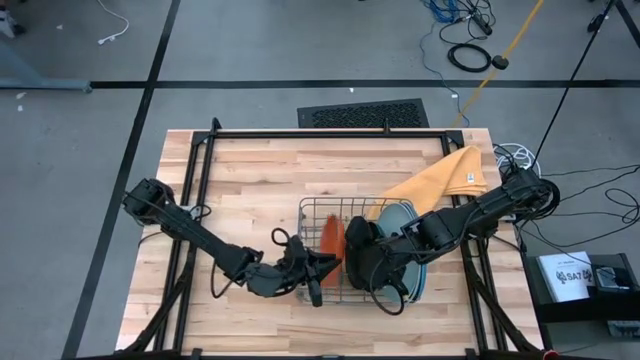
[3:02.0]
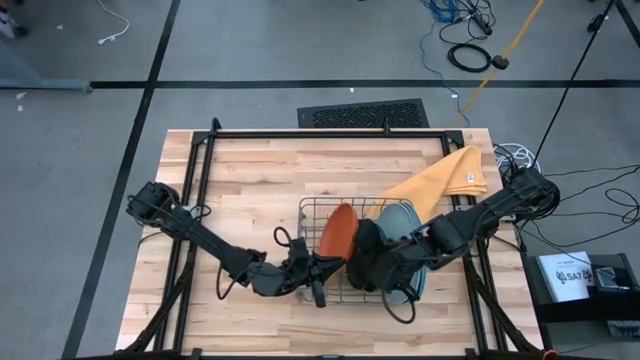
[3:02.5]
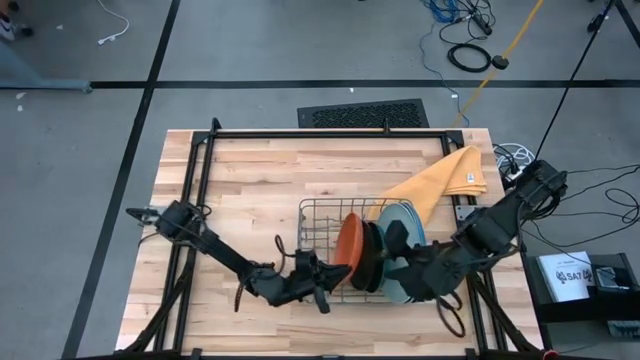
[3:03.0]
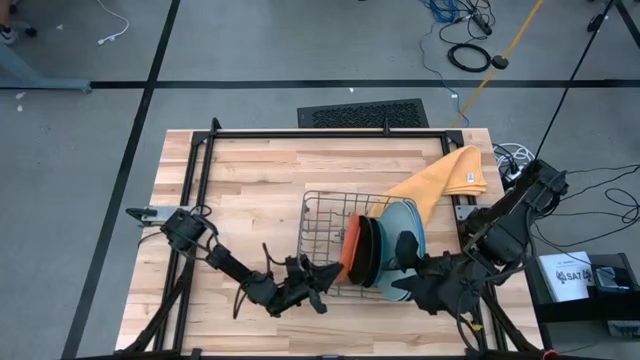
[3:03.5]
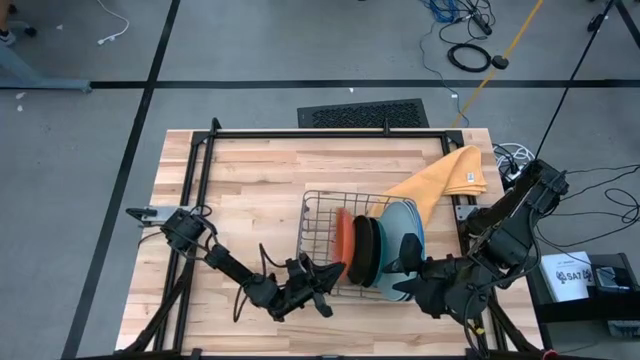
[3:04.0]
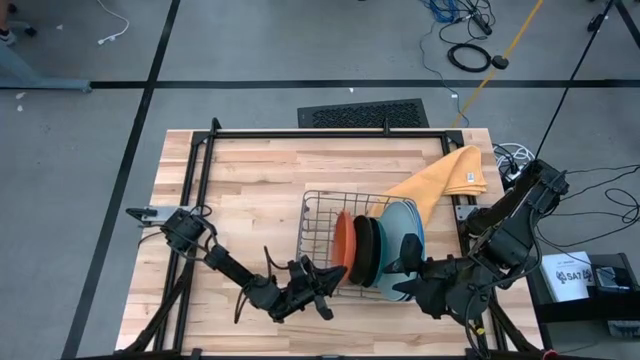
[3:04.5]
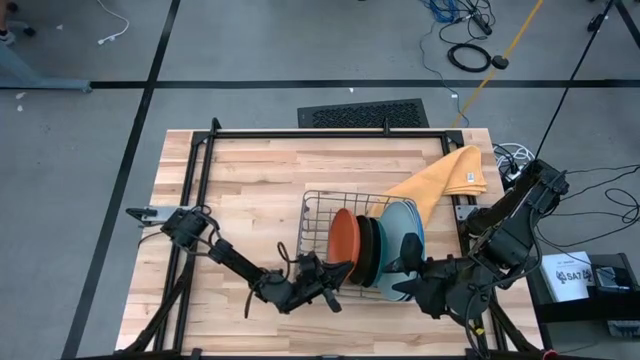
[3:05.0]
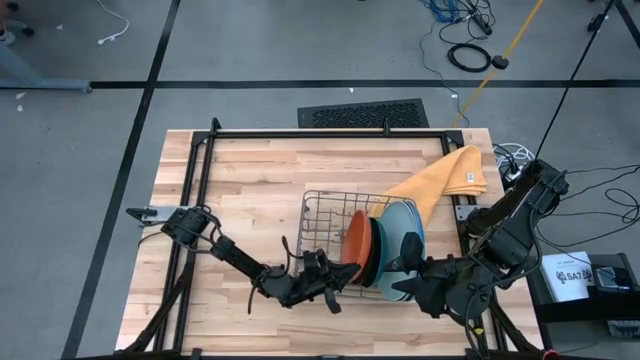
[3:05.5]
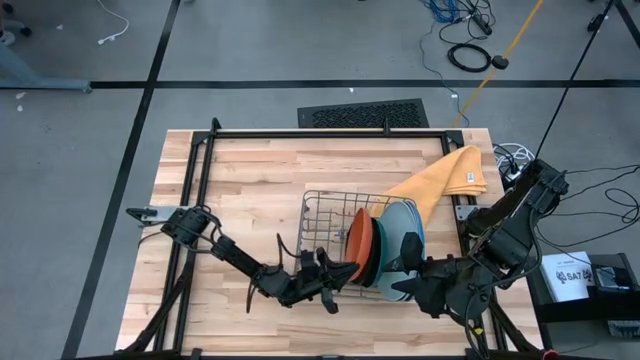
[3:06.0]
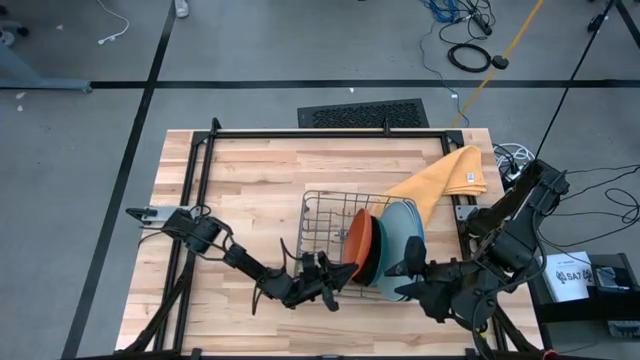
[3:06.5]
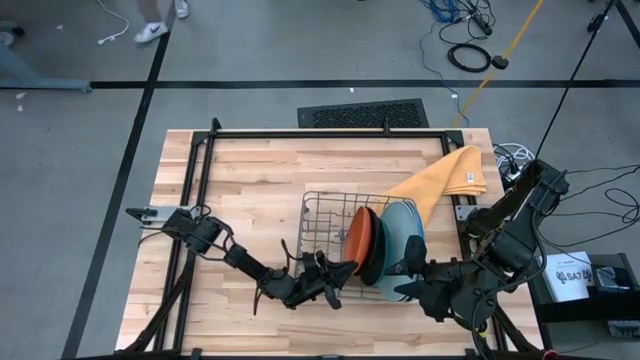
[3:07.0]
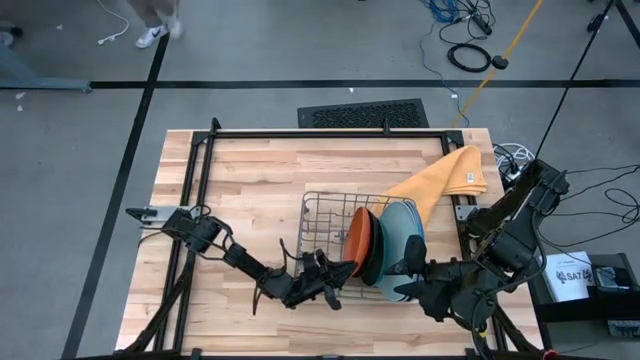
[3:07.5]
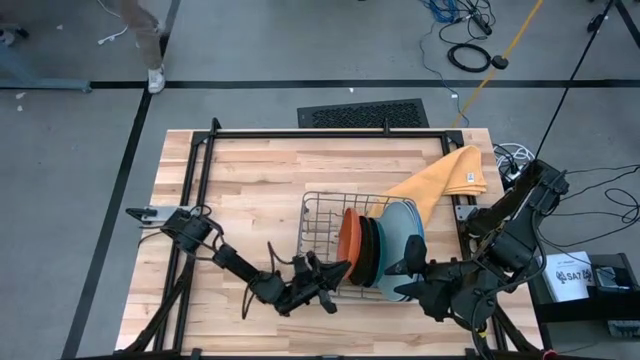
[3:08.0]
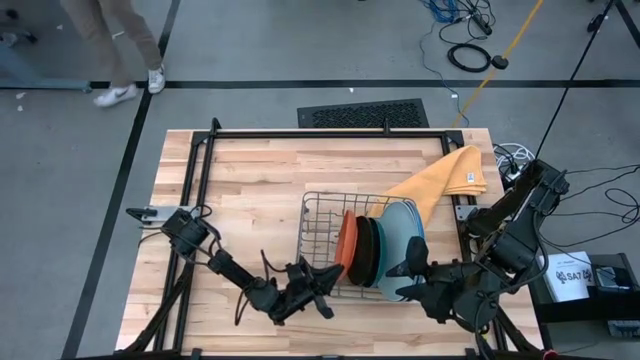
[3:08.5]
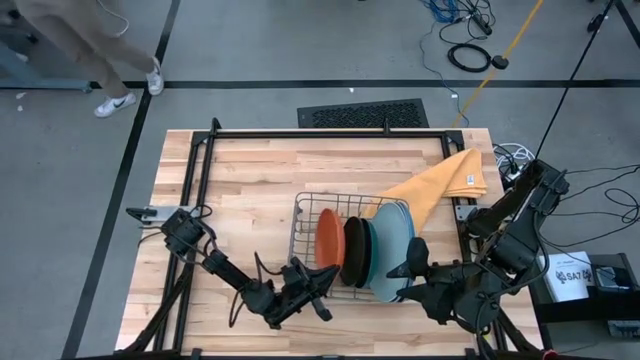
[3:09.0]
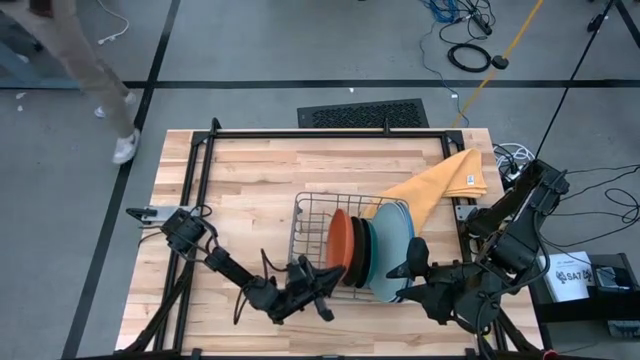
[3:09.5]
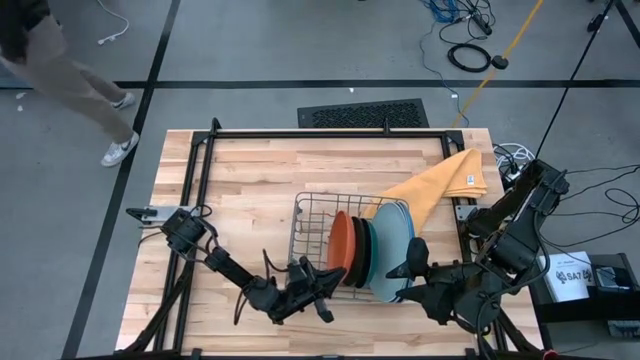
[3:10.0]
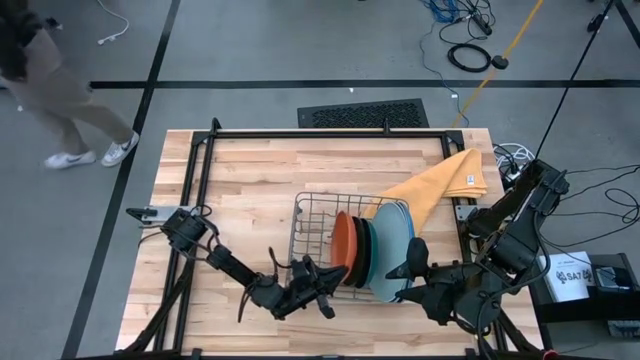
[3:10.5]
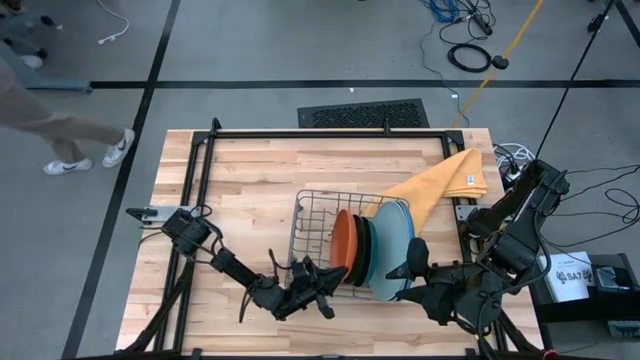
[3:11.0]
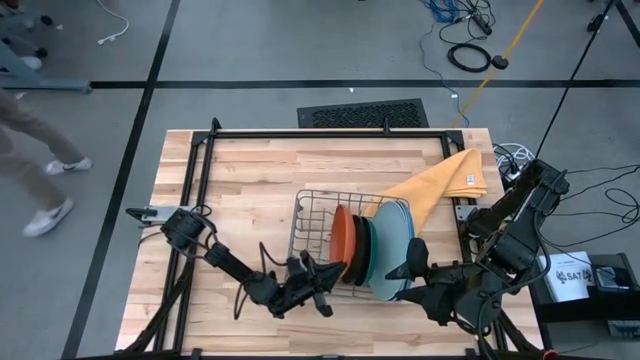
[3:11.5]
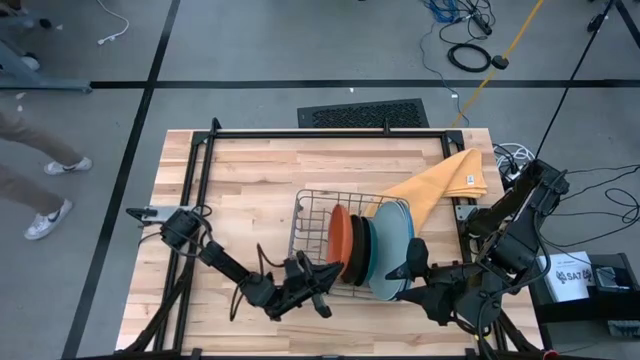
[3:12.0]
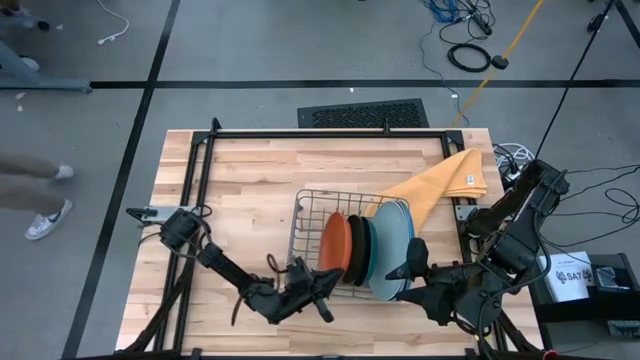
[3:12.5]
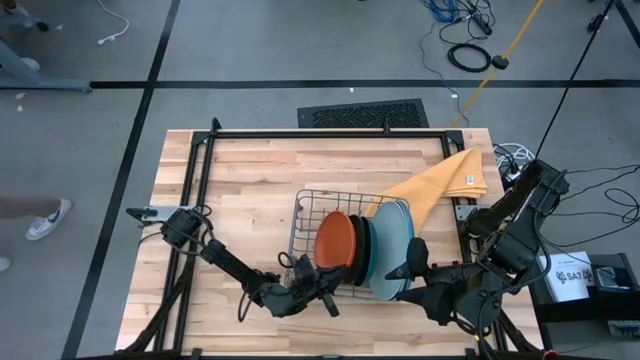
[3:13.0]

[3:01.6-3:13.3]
Task: Sort dishes
Put the orange plate into the green dish rack

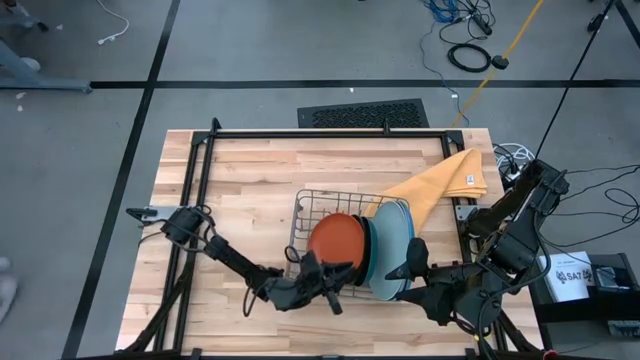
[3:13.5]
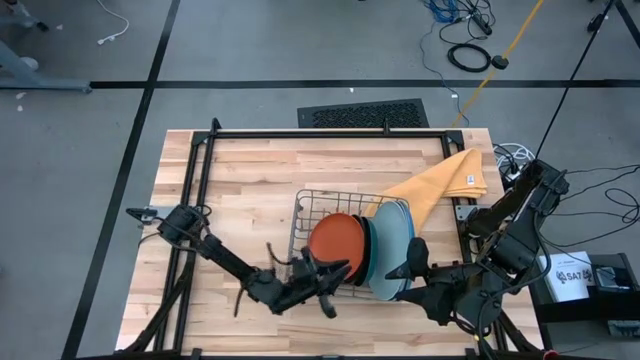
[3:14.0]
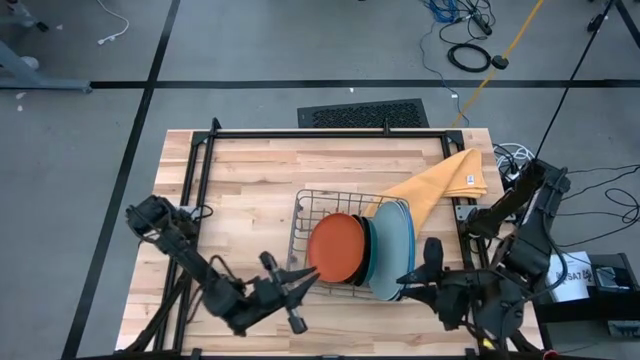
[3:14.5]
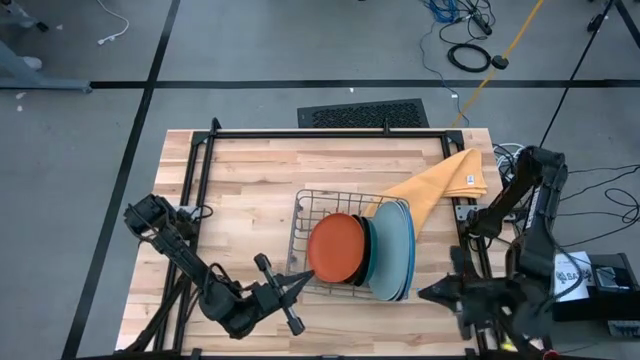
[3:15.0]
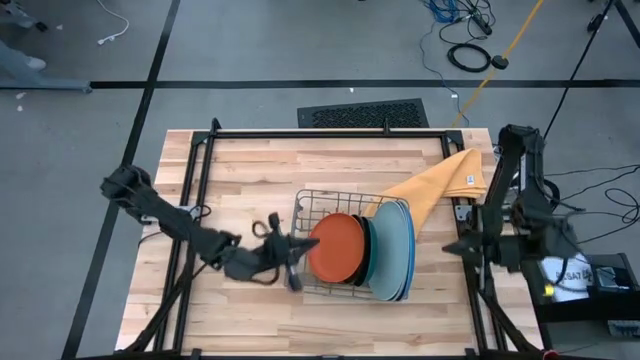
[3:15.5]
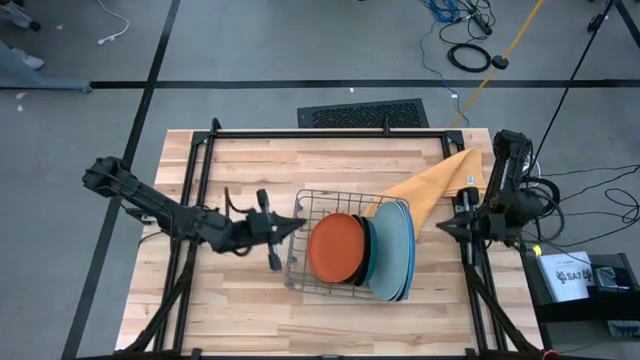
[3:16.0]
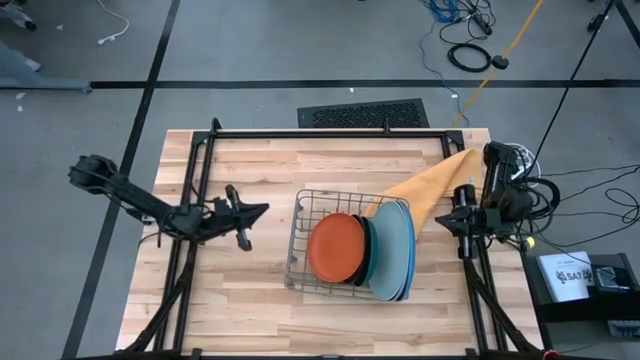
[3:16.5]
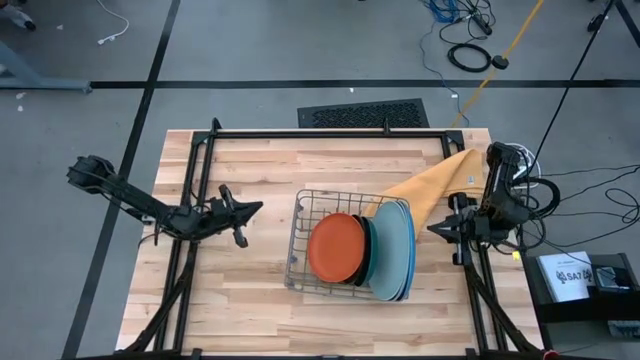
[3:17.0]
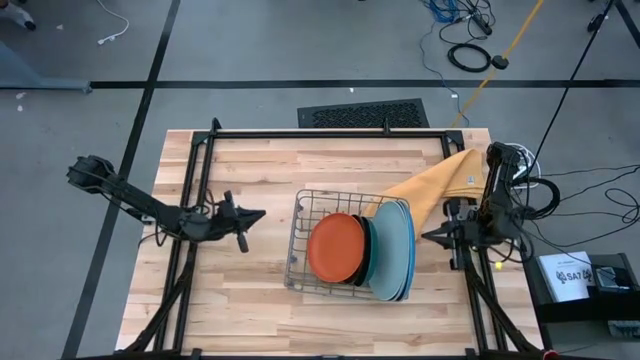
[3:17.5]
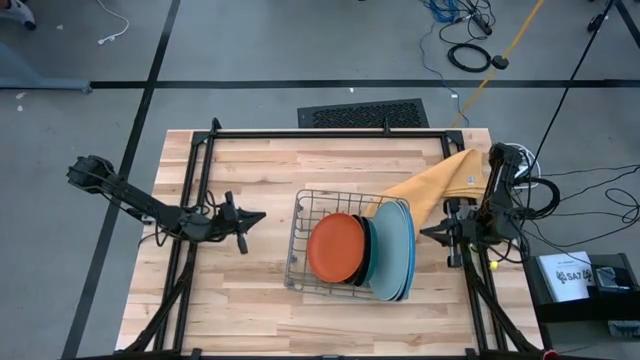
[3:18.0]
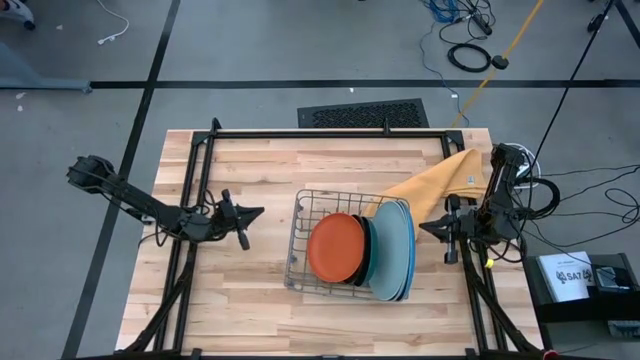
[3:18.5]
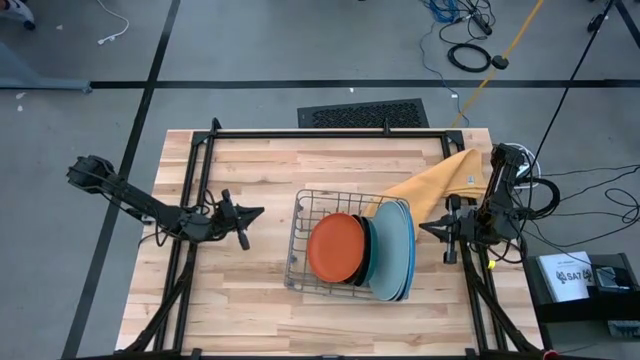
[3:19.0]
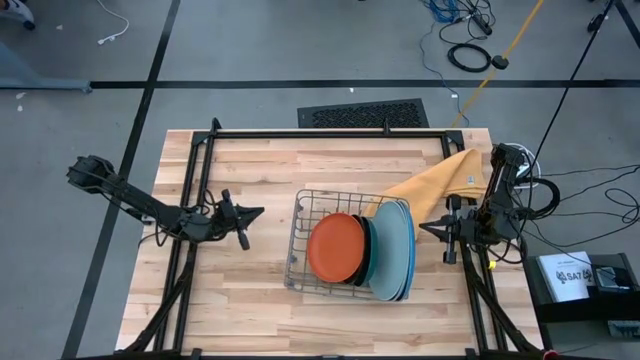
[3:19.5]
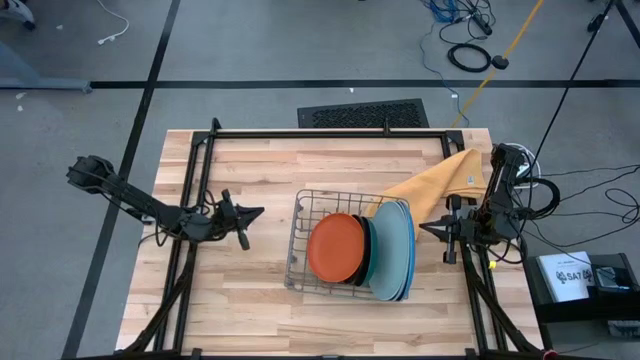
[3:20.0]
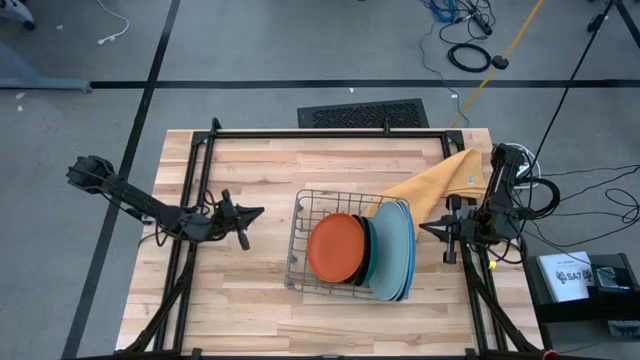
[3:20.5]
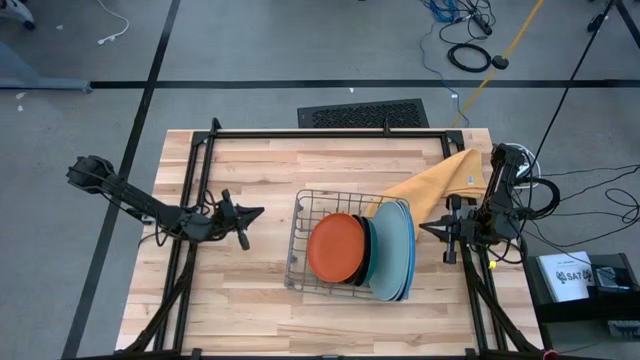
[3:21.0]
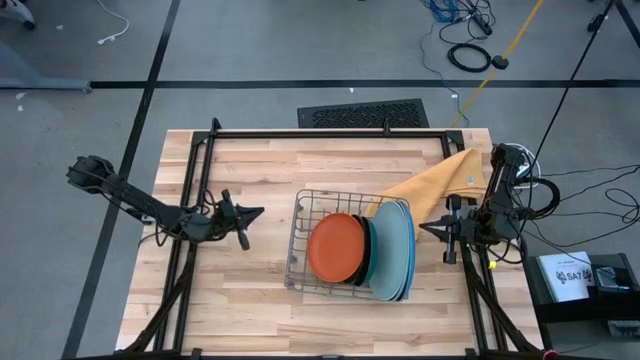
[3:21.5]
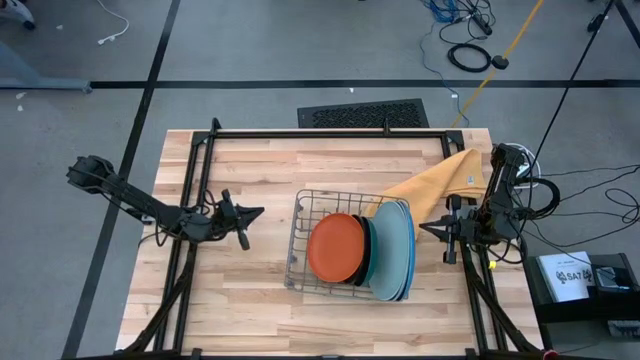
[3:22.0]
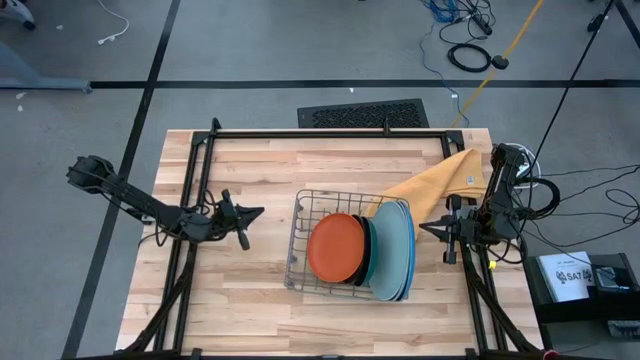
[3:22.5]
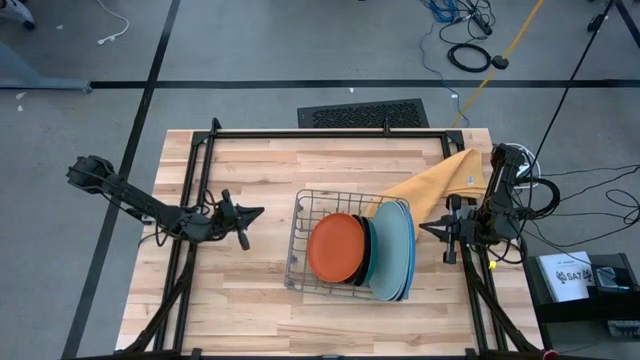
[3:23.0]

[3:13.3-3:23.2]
Return to Home Position
